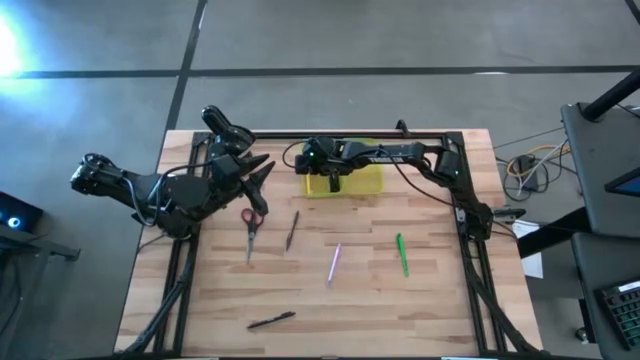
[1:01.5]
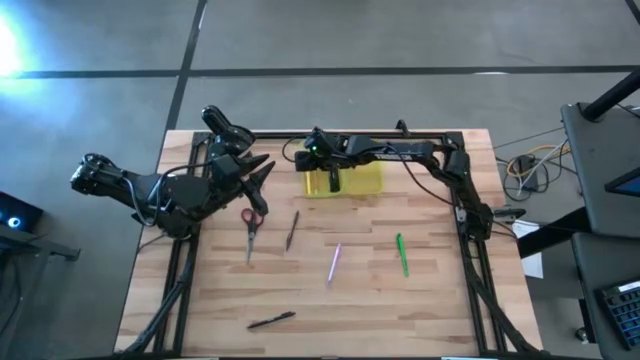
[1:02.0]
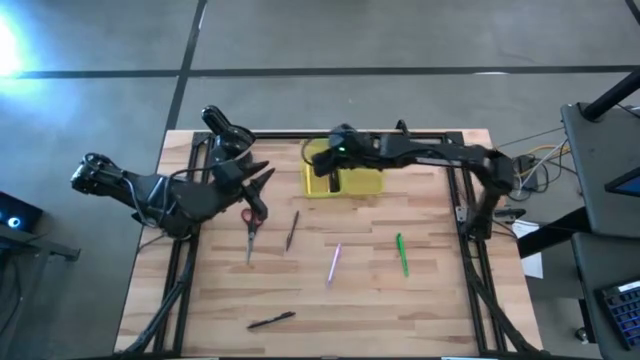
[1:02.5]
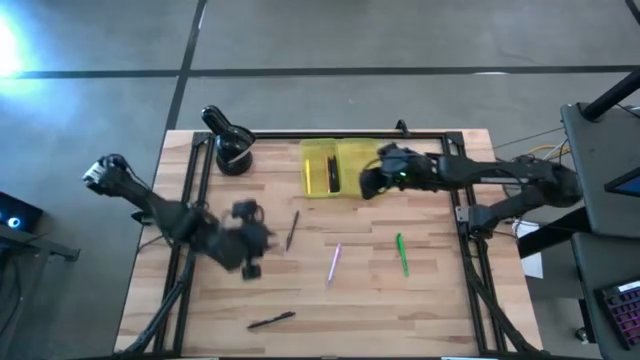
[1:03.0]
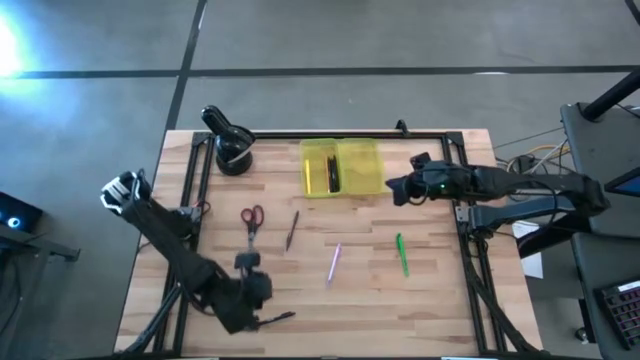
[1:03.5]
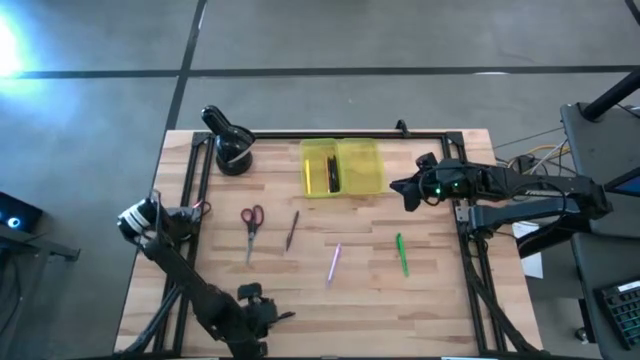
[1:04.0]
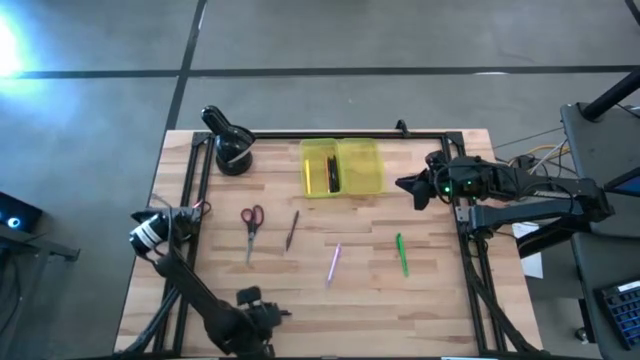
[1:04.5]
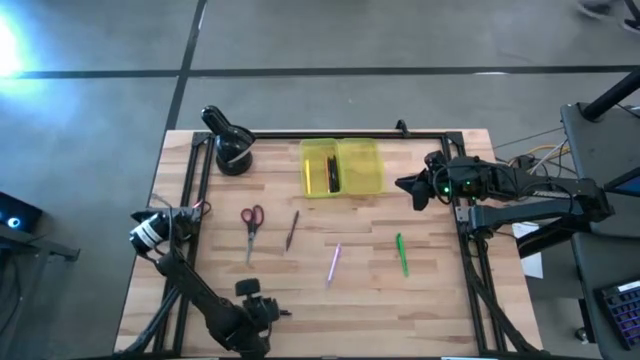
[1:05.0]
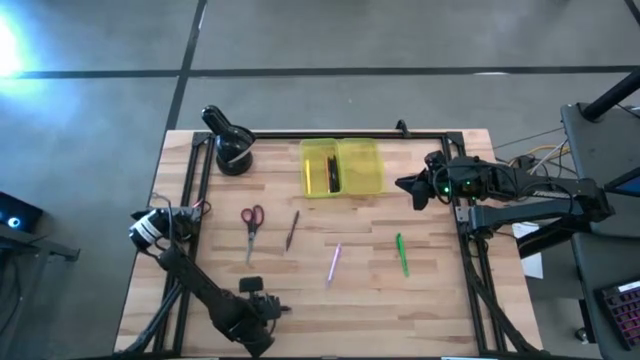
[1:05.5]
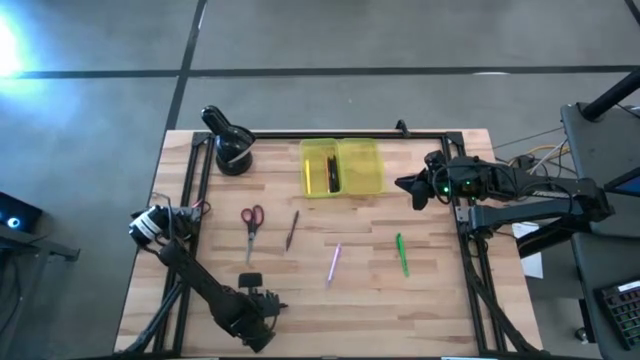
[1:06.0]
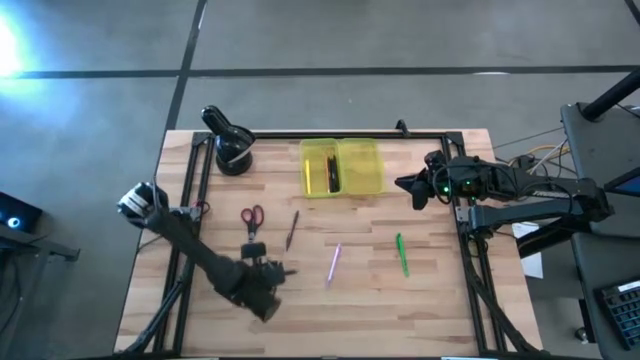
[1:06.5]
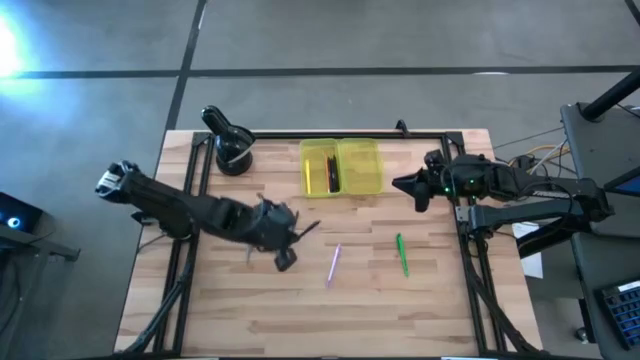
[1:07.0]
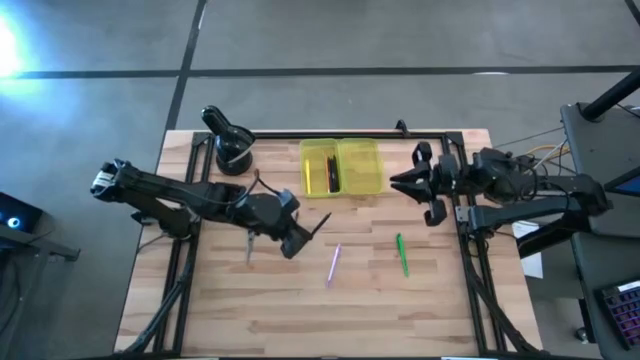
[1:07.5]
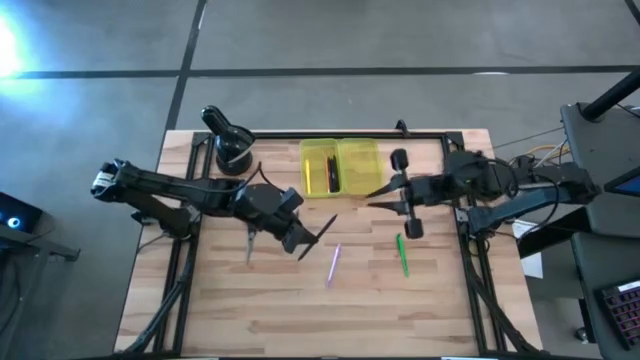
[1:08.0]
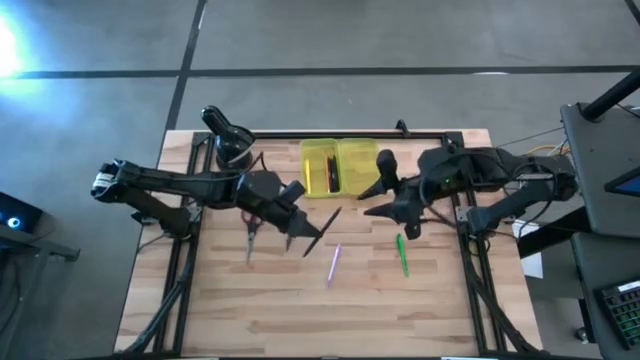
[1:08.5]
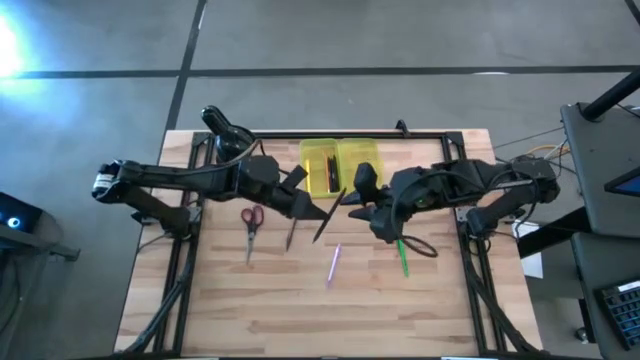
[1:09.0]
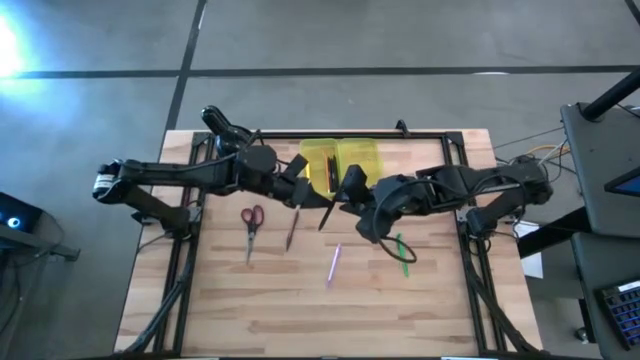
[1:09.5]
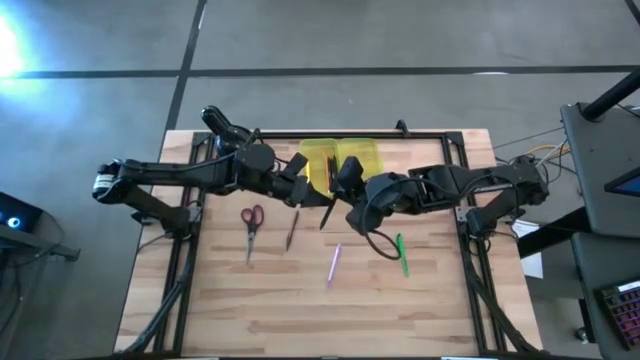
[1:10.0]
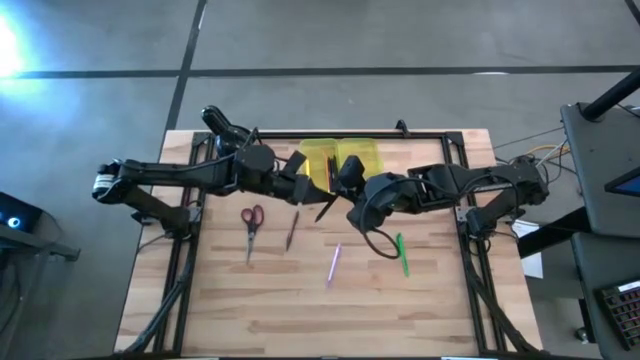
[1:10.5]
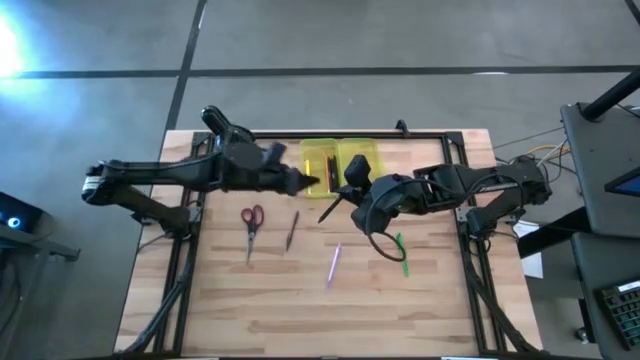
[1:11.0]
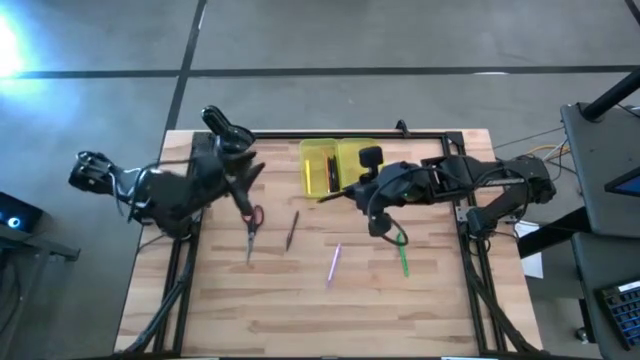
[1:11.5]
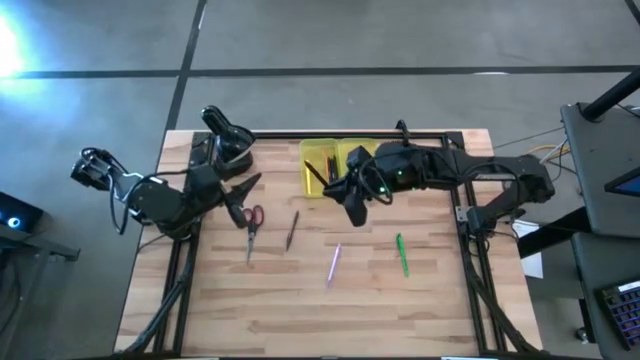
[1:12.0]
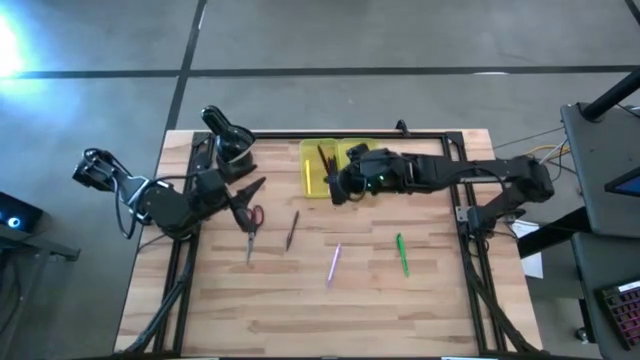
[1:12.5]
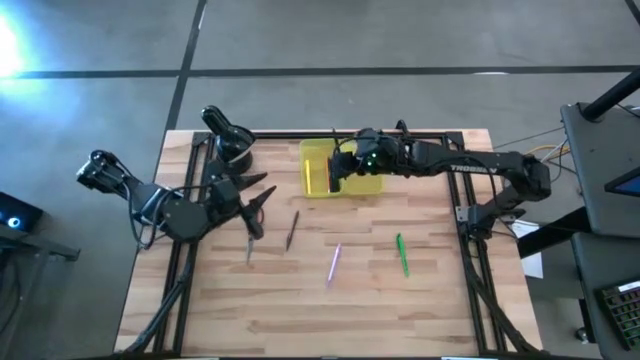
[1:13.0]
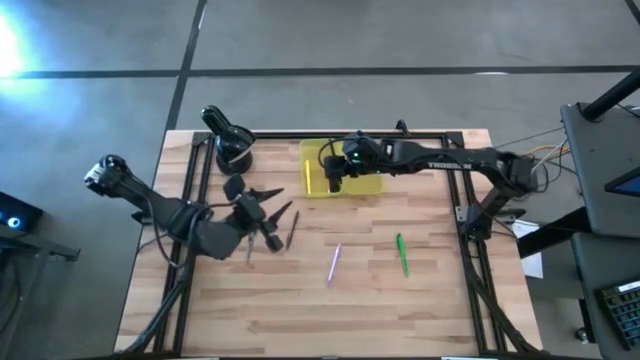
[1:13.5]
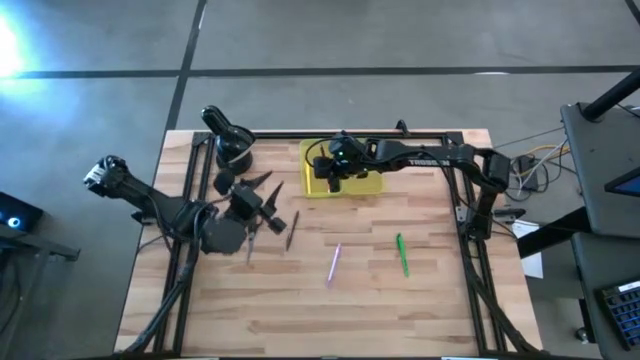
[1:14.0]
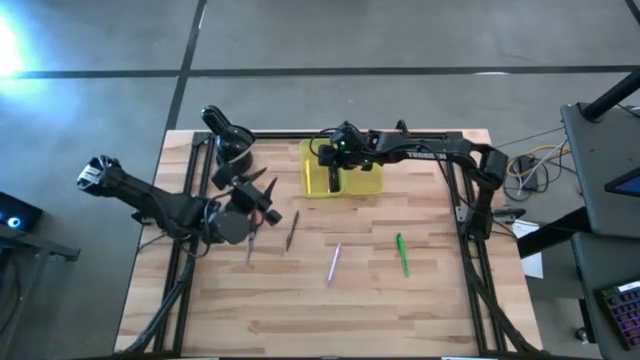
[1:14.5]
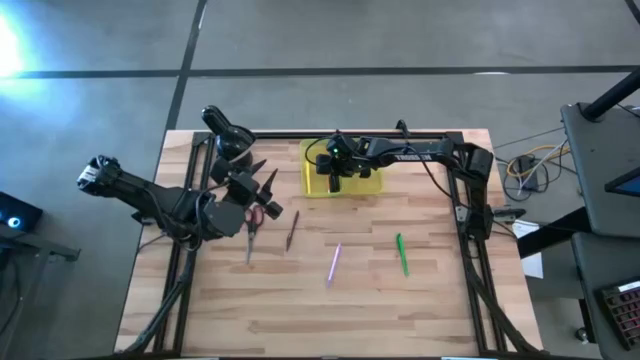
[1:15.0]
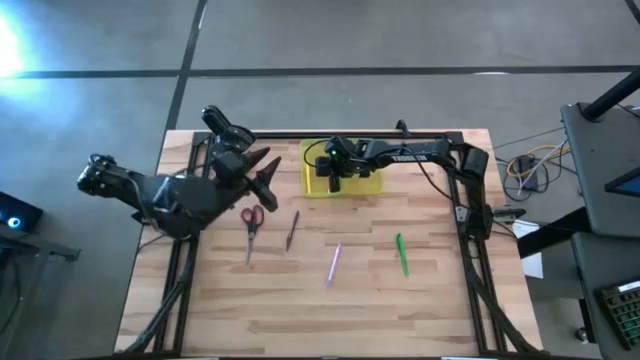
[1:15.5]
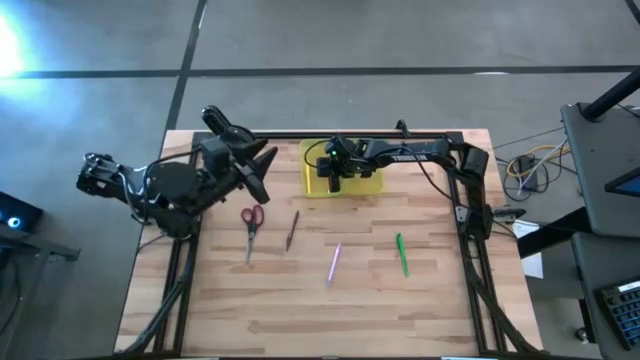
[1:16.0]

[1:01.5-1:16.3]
Task: Pick & place school supplies into a supply box
Put the black pen into the yellow supply box

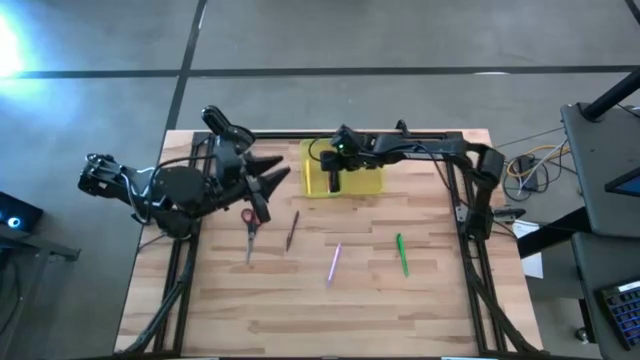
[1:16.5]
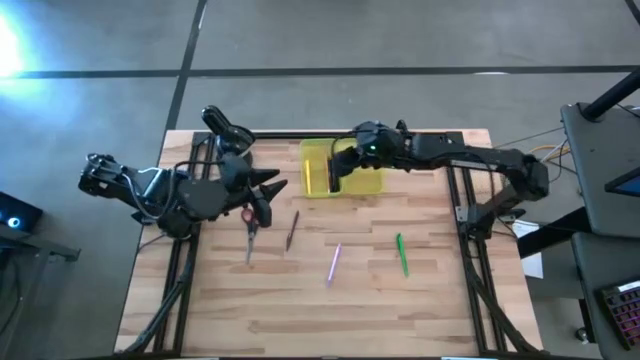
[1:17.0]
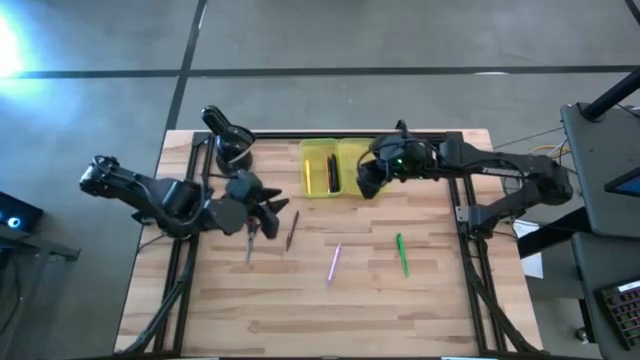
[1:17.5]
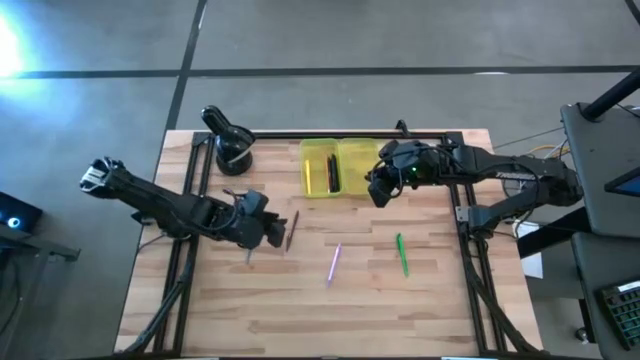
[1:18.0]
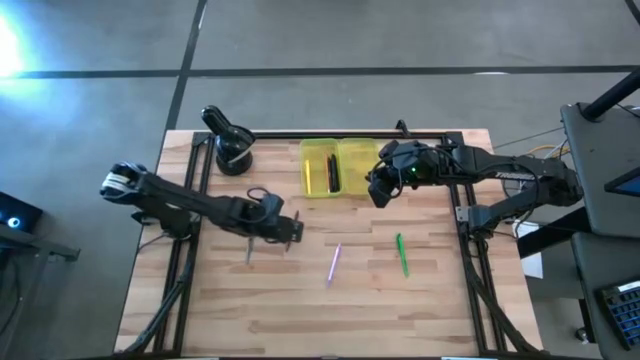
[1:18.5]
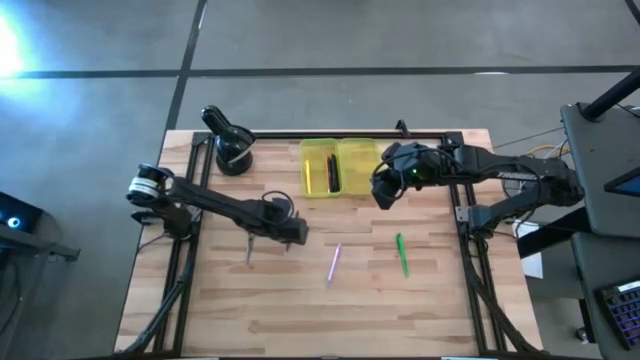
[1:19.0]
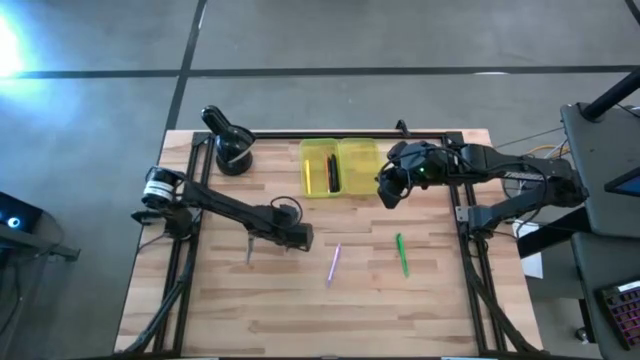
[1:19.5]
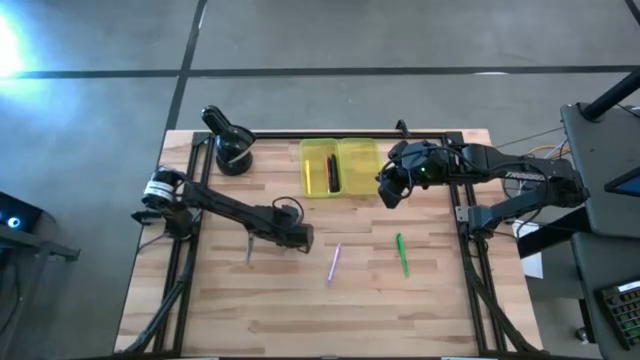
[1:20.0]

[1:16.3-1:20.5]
Put the brown pen into the yellow supply box

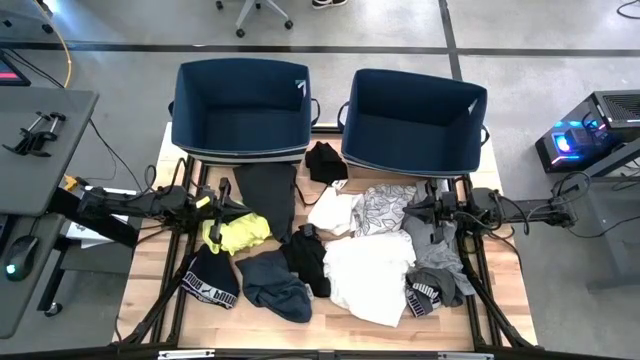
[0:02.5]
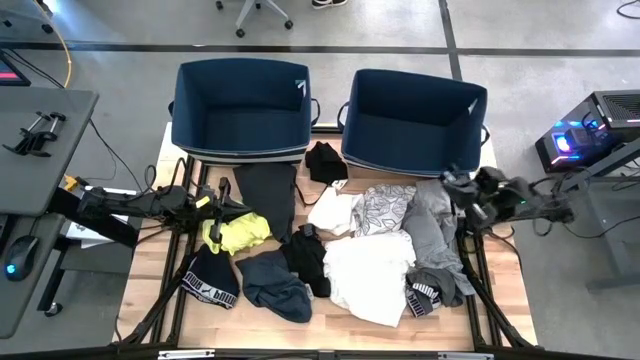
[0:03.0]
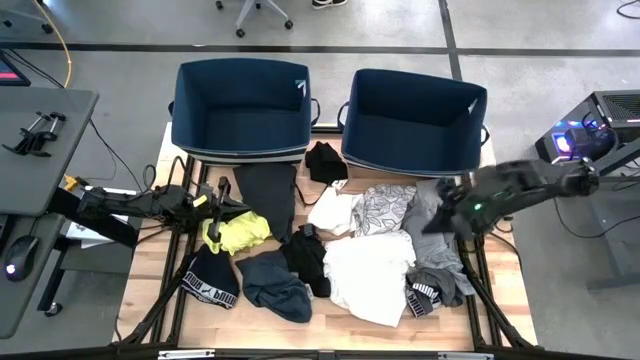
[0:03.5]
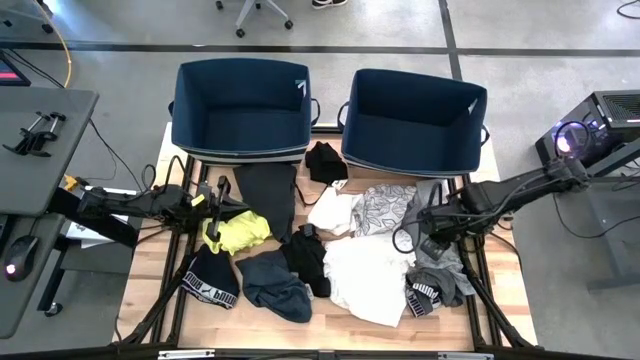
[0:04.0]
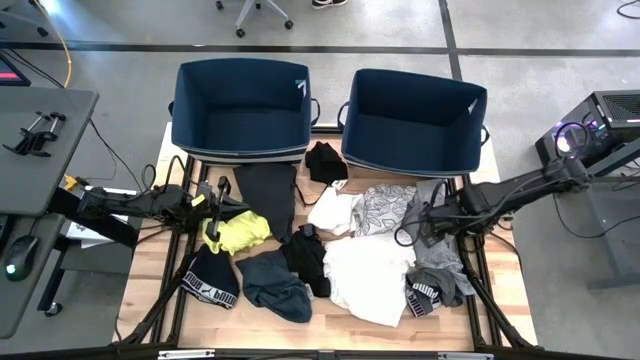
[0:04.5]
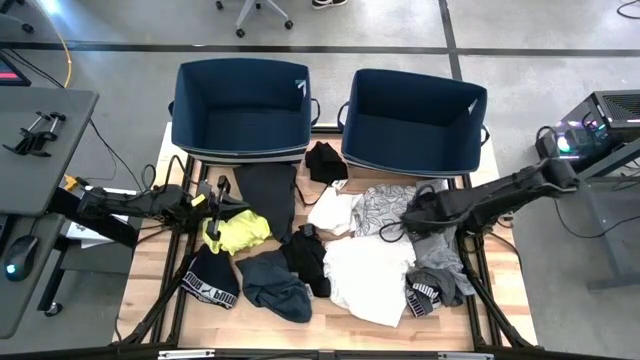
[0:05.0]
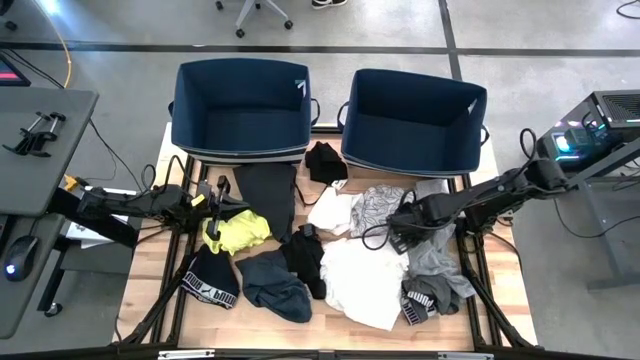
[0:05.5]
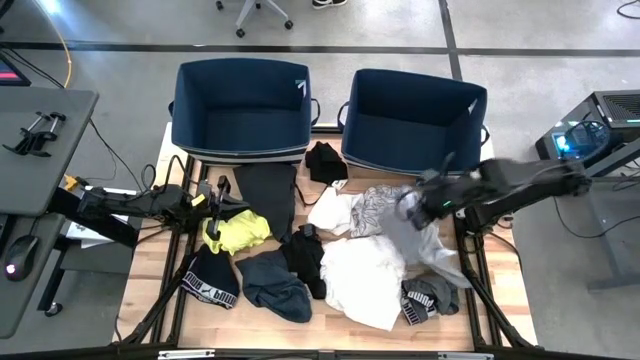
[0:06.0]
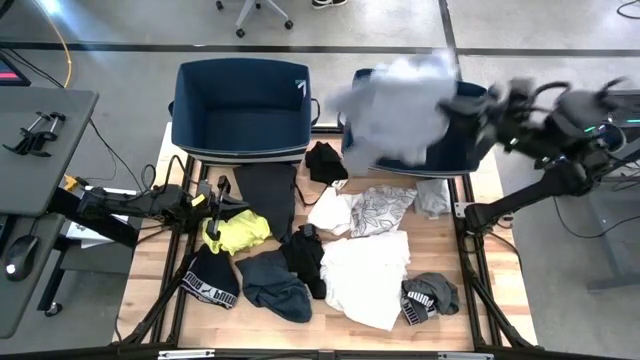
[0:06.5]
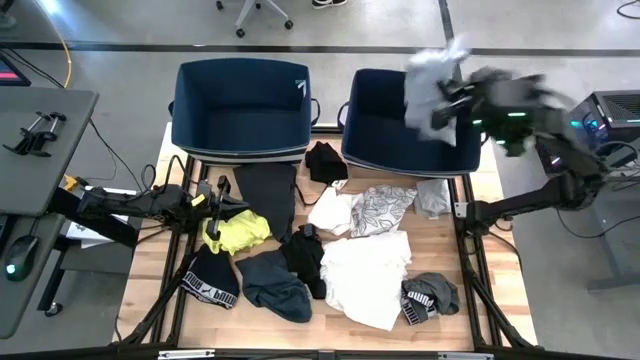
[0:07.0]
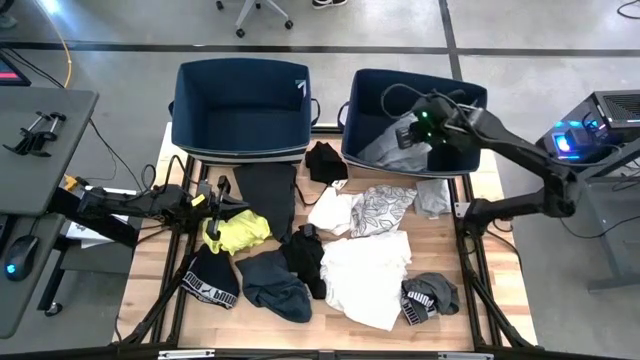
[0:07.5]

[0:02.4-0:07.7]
Task: Sort clothes
Put the gray shirt into the right laundry bin
